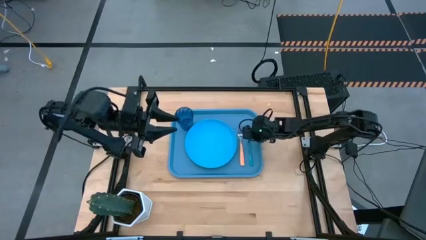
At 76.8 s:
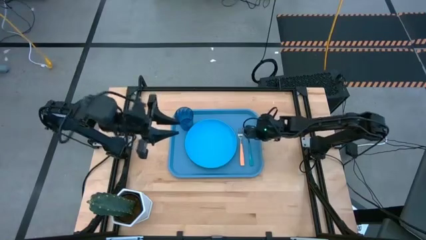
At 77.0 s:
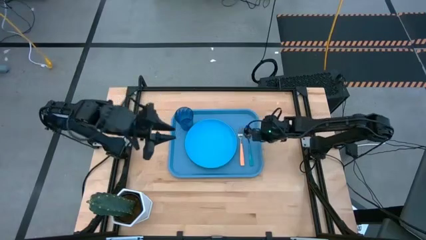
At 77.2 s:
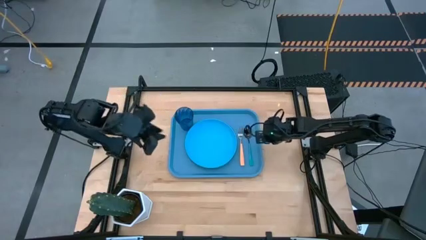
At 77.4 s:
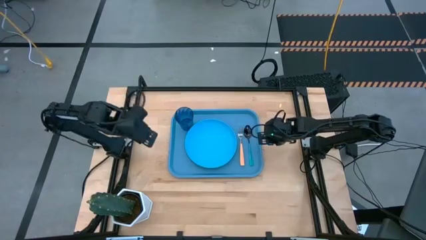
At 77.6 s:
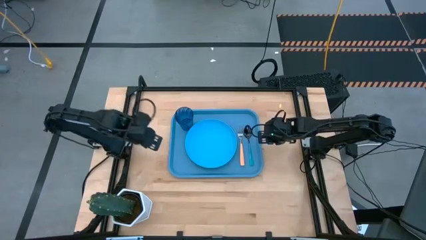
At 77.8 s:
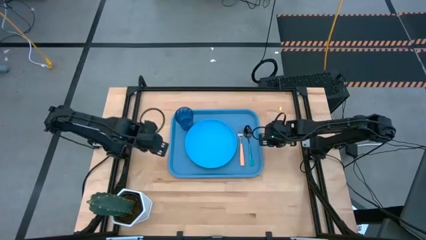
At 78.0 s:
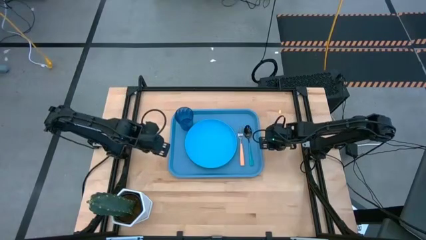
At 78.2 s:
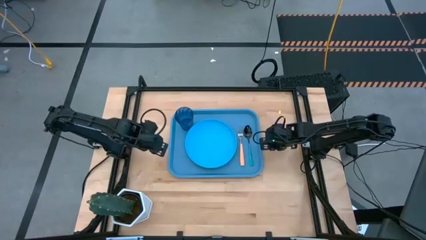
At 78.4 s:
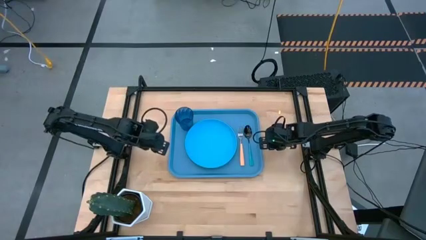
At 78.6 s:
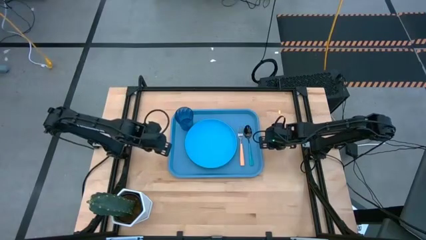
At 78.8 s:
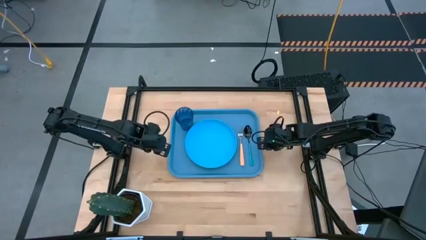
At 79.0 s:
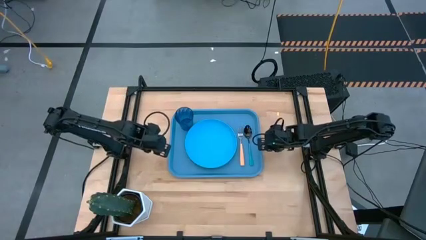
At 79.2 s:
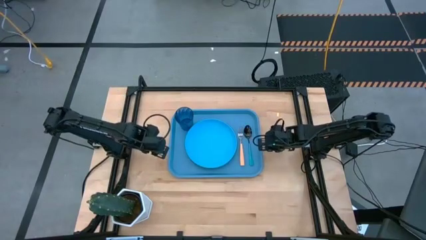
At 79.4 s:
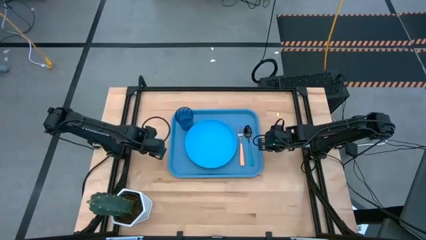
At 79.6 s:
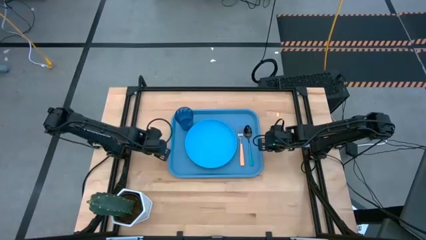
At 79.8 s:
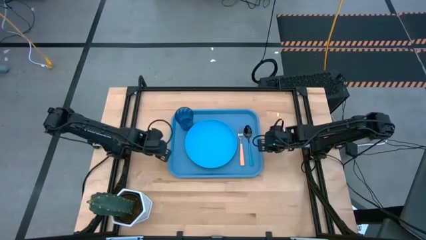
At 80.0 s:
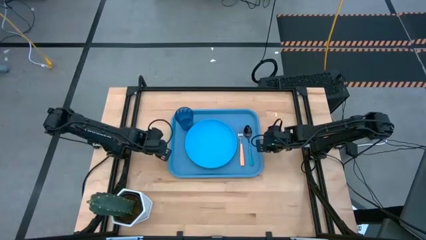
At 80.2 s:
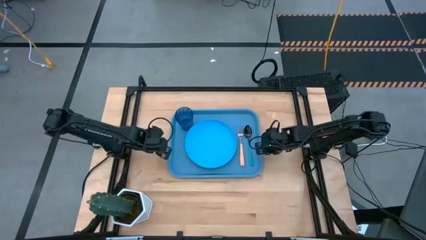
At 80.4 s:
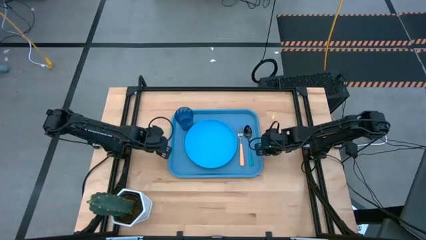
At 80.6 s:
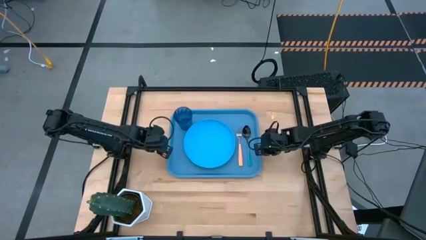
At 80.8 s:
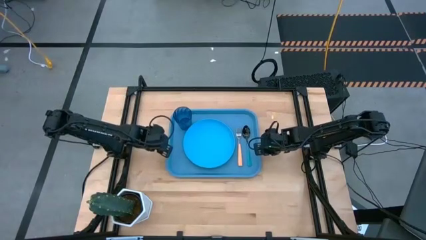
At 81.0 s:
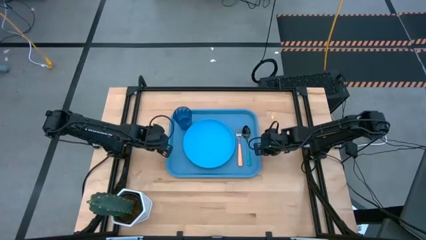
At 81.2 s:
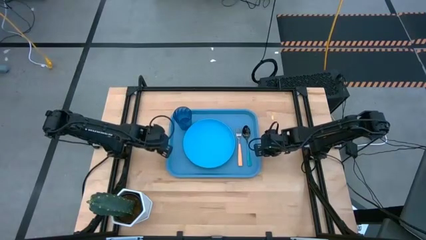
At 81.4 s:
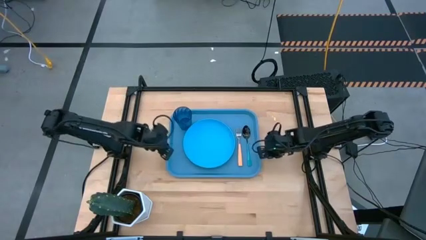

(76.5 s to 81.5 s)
Task: Pick and place plate/cup/fork/spoon on tray
Adjust the blue serving tray on the table

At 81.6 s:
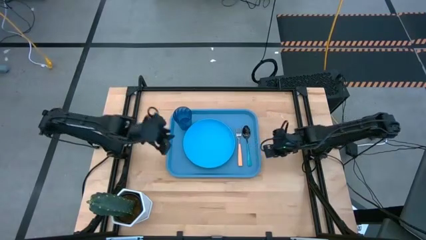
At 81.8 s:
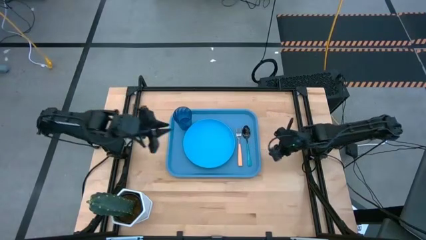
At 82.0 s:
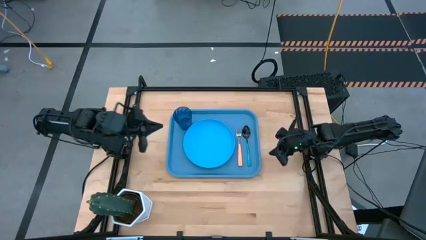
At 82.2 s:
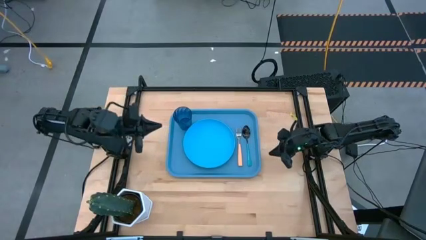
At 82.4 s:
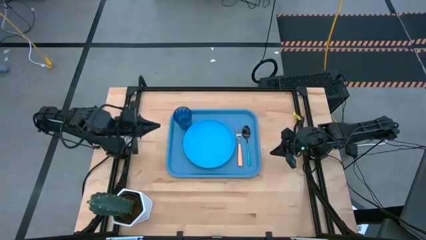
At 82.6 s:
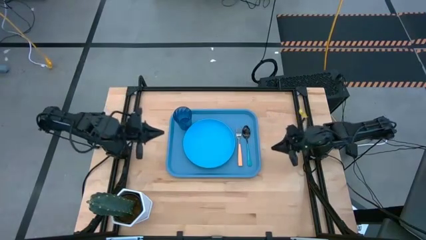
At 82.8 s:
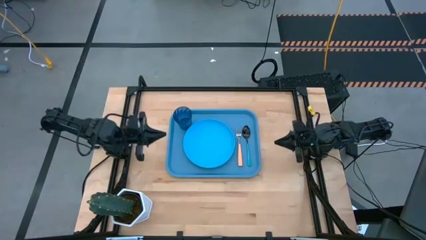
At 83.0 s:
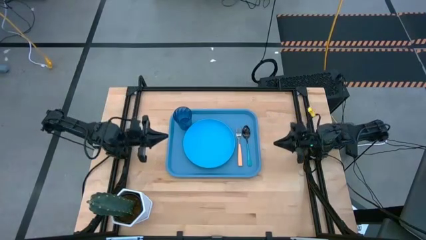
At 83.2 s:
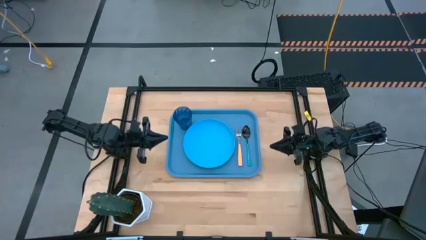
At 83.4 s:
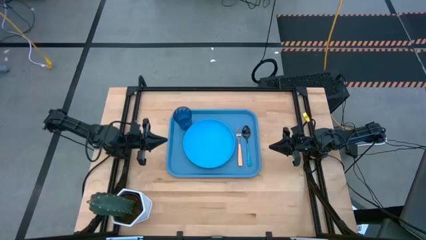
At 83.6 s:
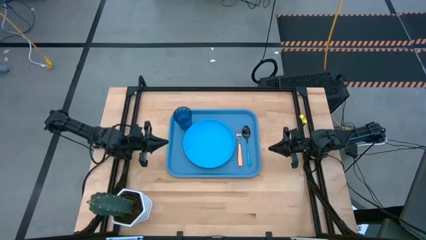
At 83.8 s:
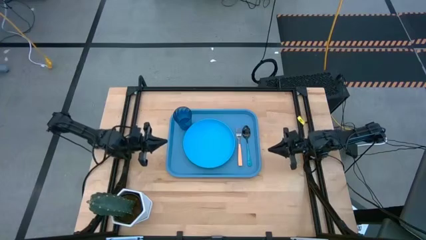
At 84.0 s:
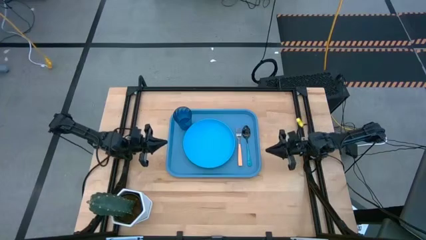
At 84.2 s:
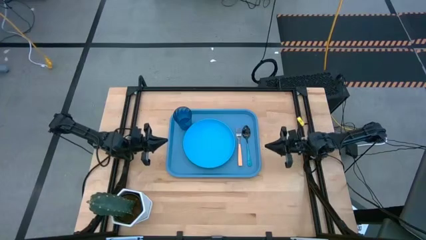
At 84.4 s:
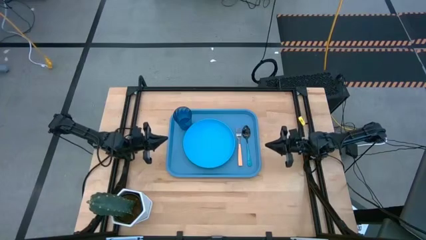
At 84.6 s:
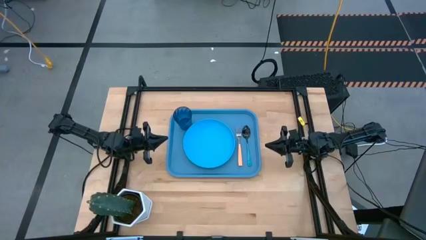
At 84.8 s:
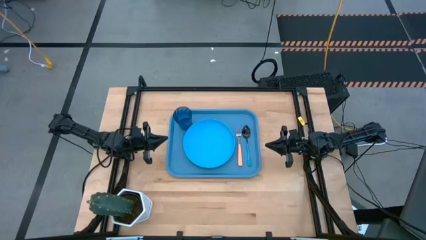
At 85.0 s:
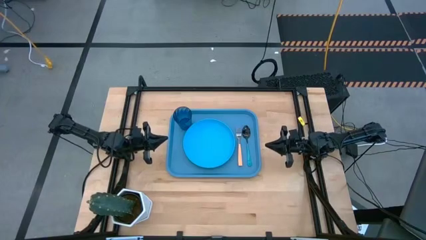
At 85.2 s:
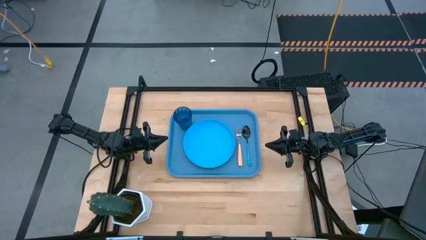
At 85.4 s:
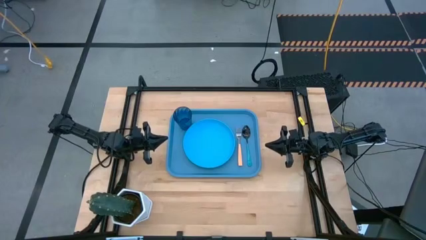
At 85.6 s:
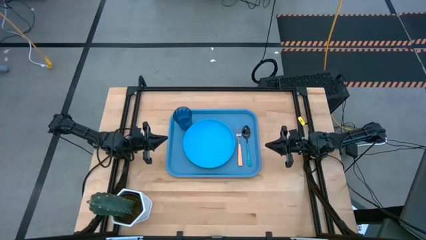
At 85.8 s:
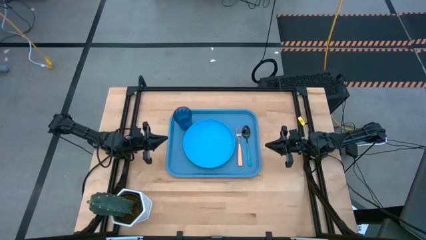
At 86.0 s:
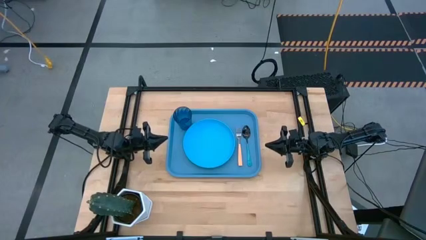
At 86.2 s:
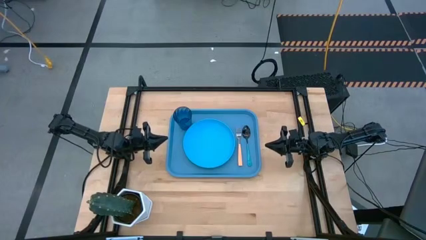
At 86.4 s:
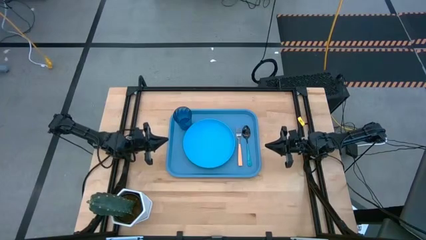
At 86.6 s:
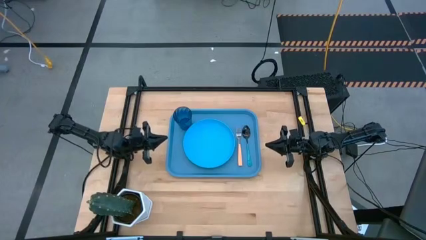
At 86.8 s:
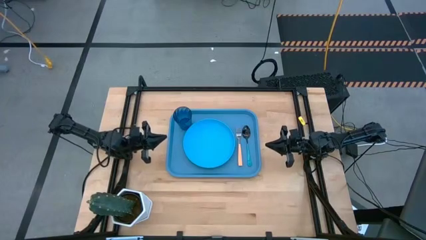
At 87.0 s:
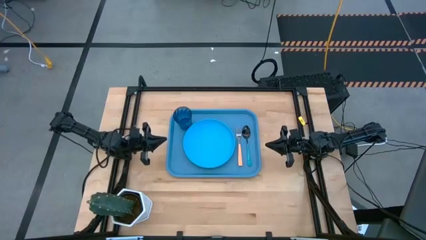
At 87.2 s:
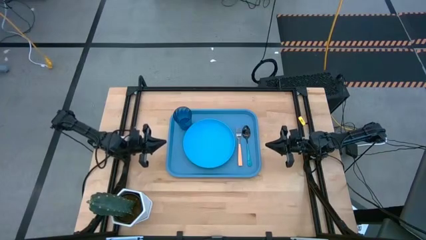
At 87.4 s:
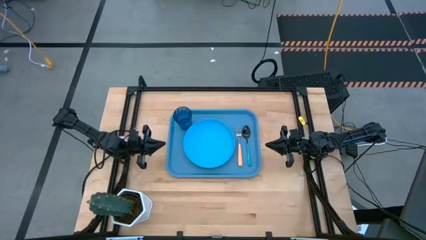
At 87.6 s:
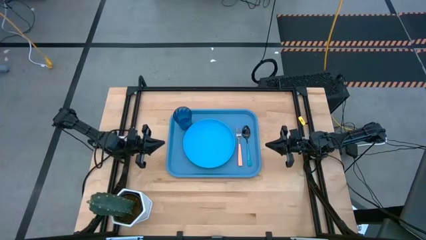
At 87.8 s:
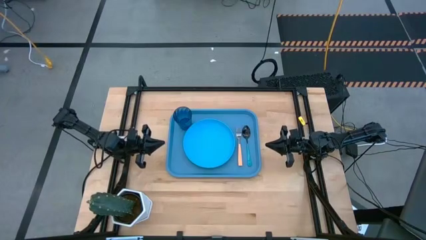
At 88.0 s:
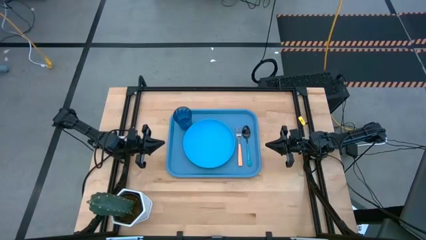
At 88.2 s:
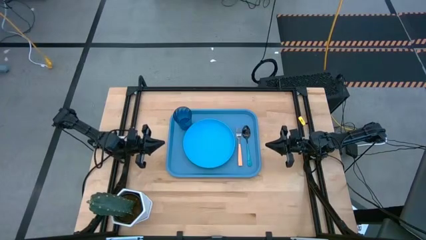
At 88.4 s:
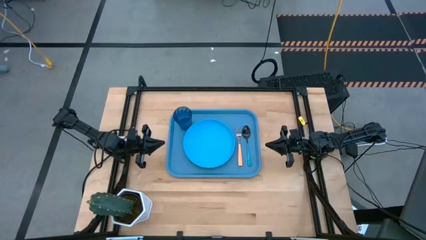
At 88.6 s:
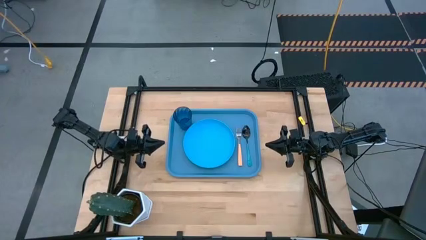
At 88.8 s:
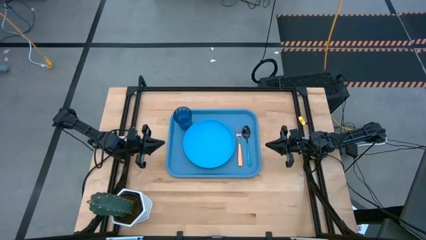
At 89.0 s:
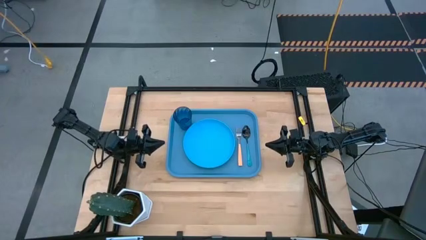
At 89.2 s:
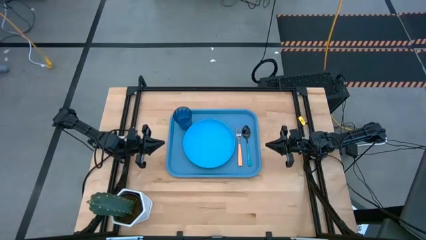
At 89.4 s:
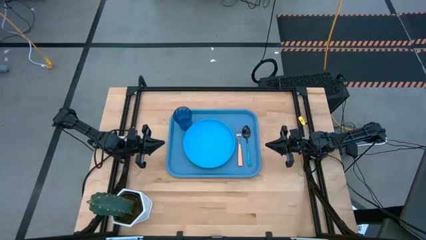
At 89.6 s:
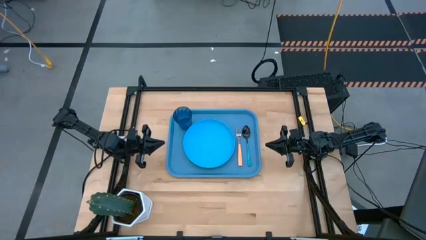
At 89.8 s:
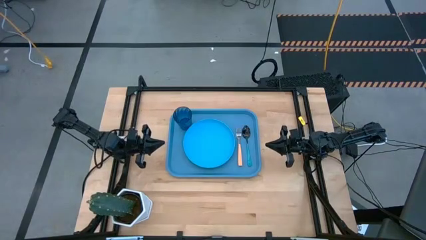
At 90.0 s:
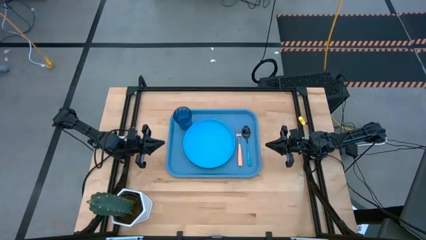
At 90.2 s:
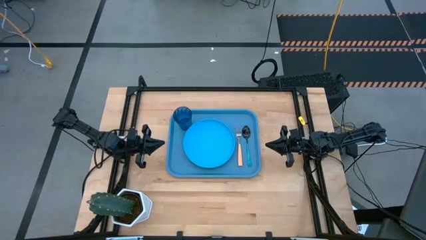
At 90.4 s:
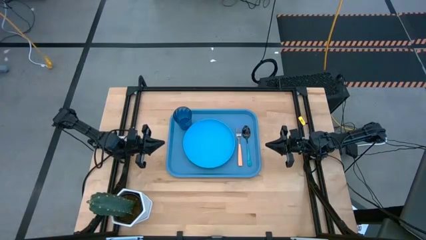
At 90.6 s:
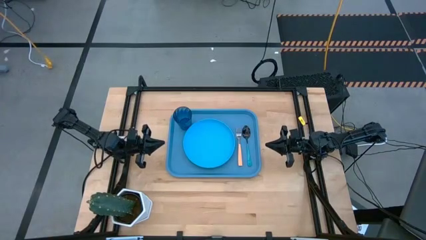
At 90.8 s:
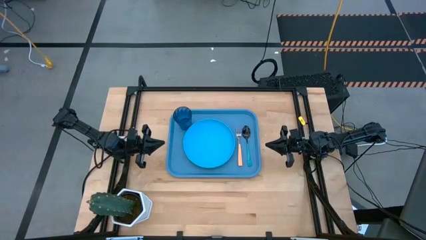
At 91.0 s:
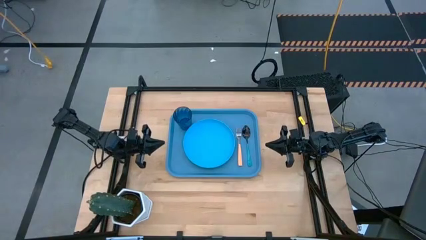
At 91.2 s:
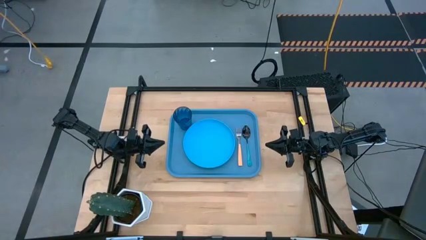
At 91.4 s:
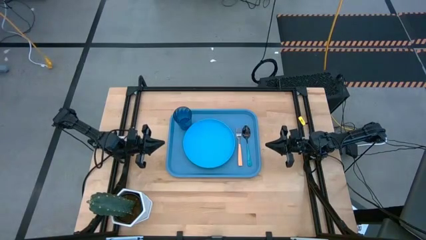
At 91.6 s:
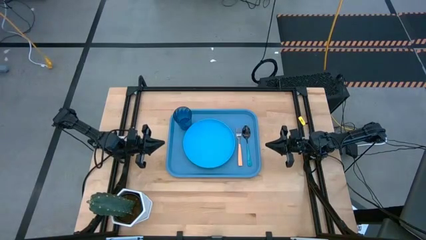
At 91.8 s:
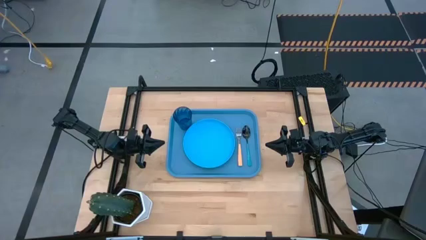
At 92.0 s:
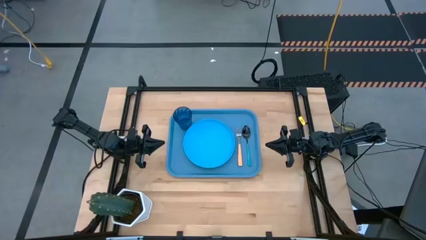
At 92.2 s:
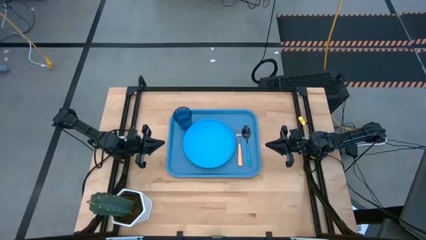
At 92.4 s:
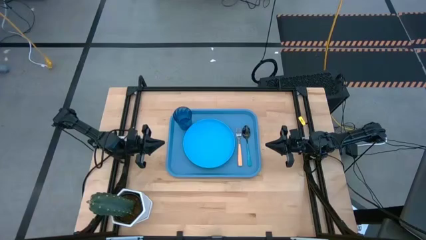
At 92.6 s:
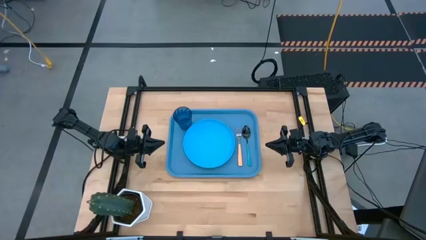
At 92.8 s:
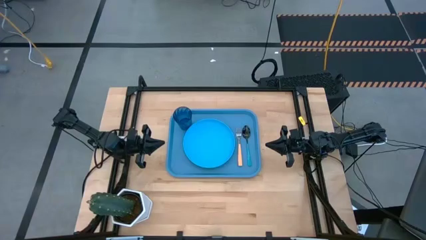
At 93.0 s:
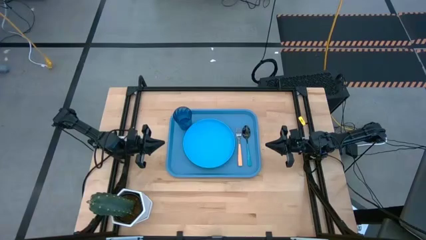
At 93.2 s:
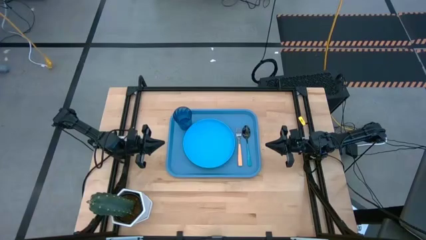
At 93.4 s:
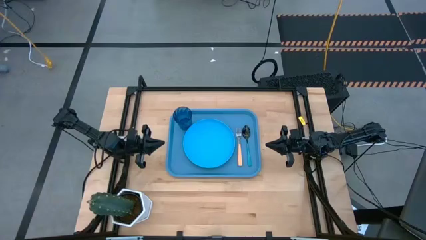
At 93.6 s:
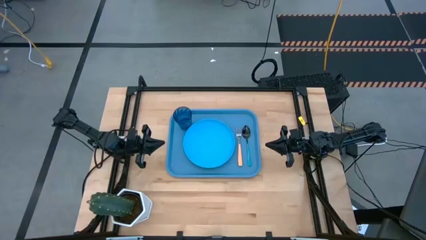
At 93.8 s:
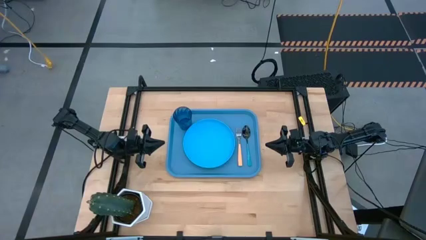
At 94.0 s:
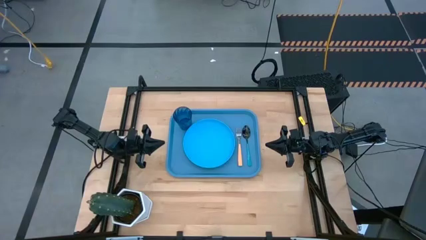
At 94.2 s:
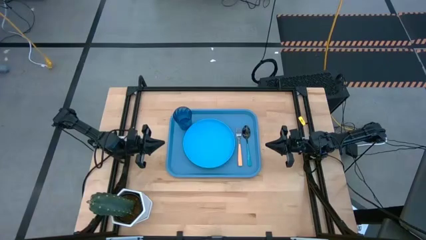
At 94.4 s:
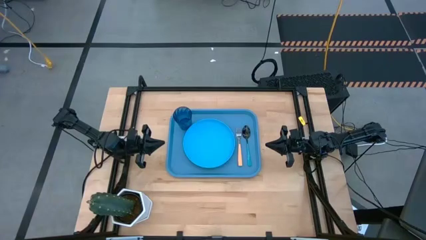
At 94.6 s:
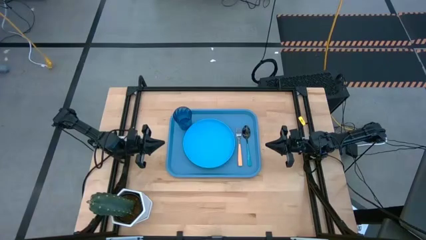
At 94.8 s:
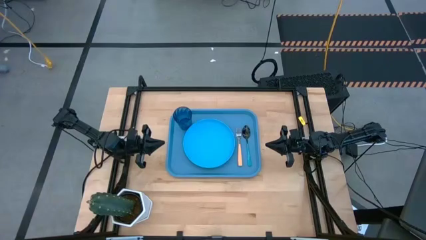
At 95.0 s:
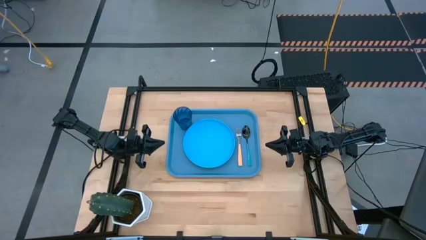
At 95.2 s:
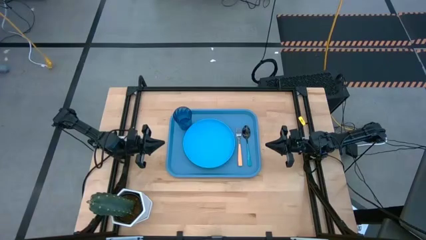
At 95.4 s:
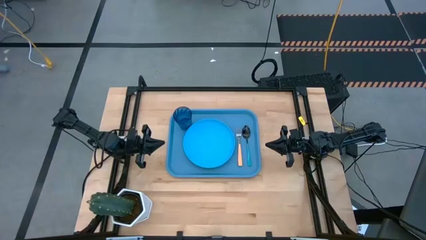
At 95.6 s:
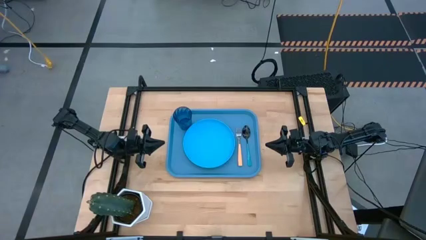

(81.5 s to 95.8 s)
Return to Home Position
